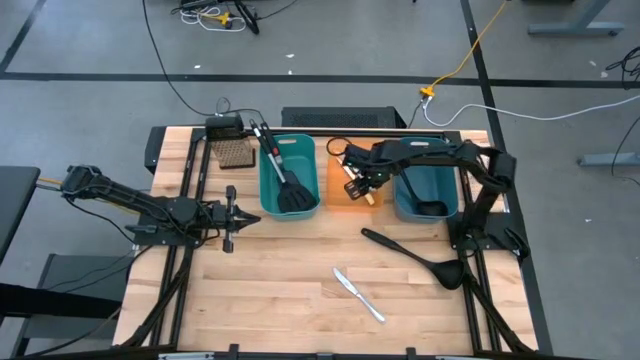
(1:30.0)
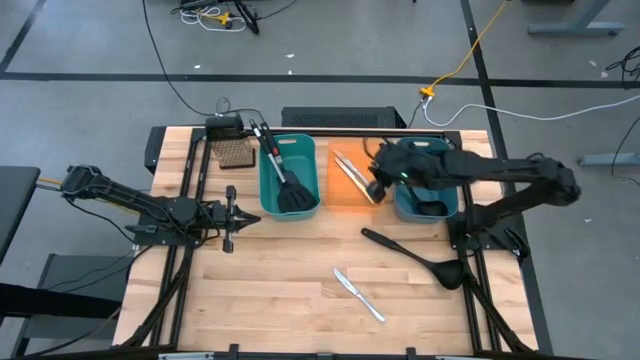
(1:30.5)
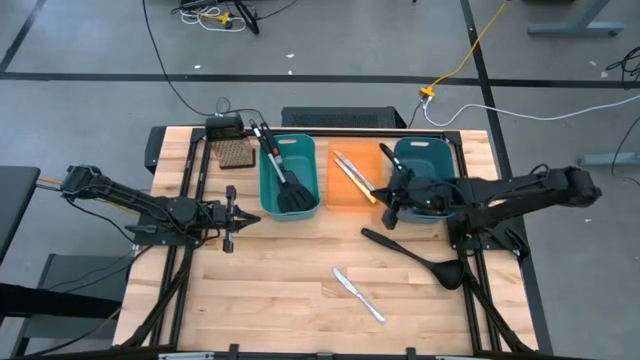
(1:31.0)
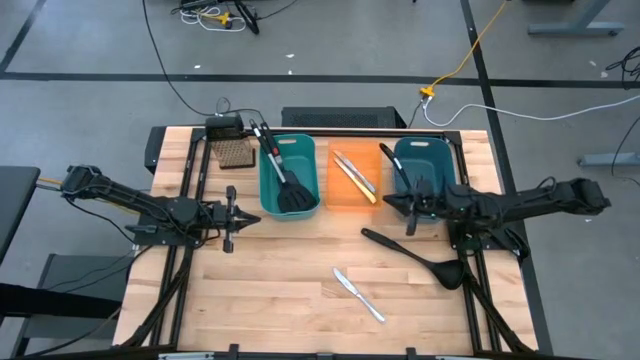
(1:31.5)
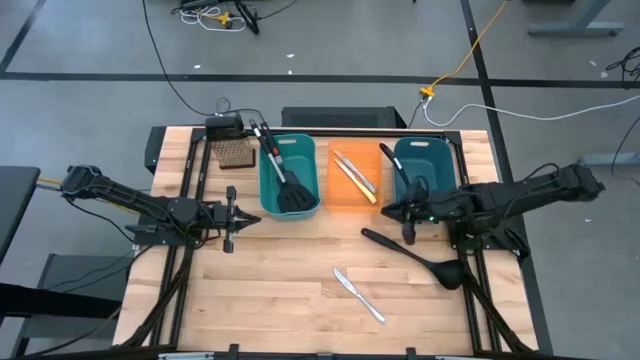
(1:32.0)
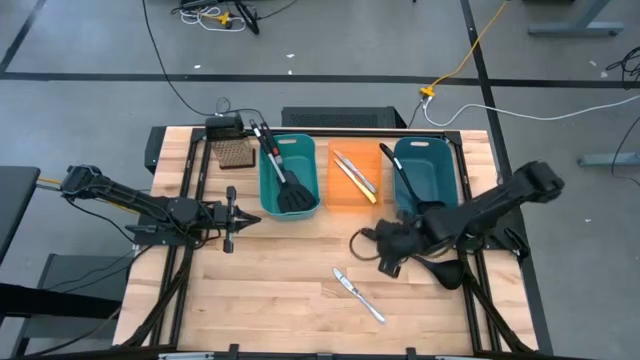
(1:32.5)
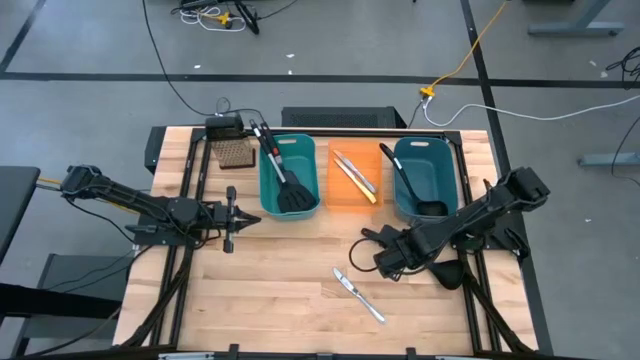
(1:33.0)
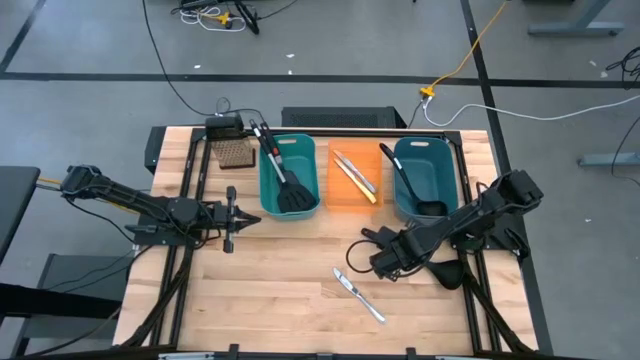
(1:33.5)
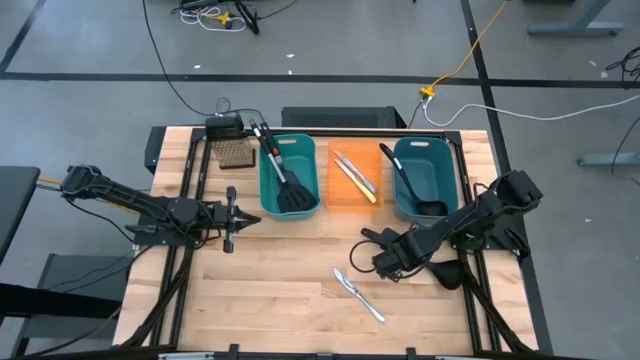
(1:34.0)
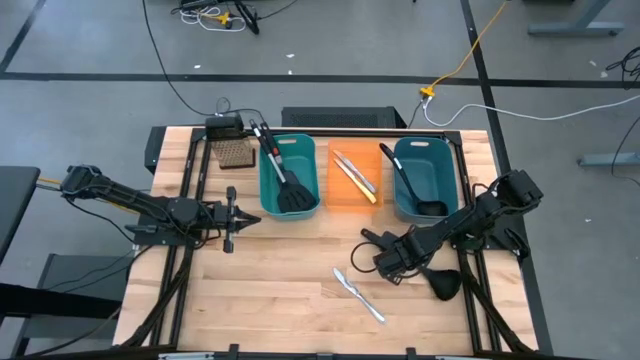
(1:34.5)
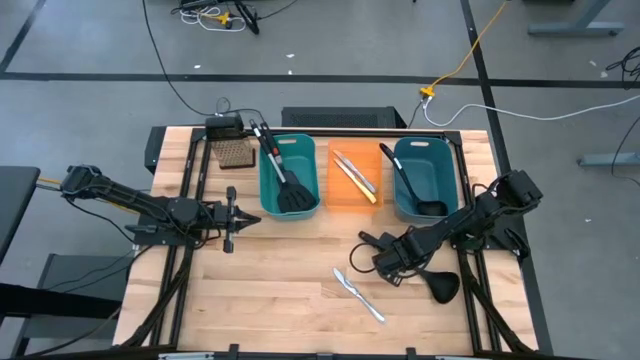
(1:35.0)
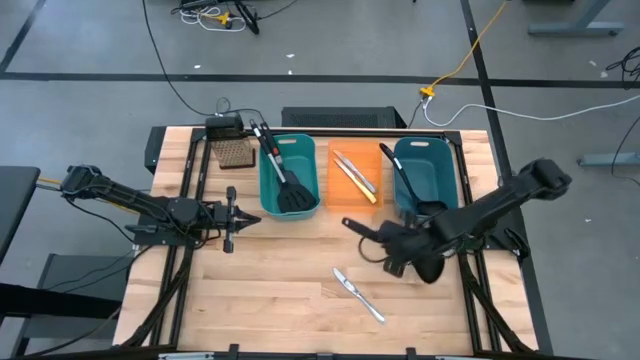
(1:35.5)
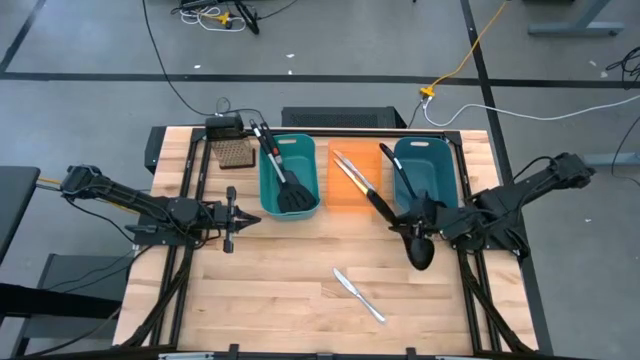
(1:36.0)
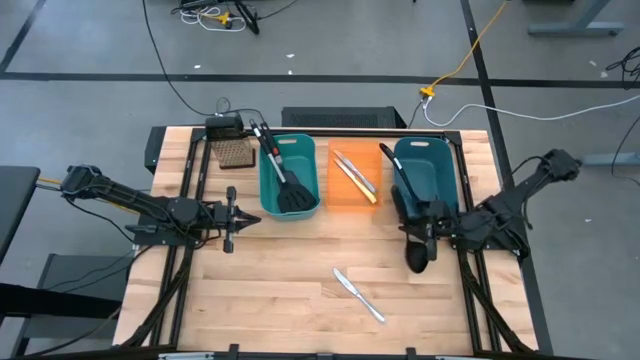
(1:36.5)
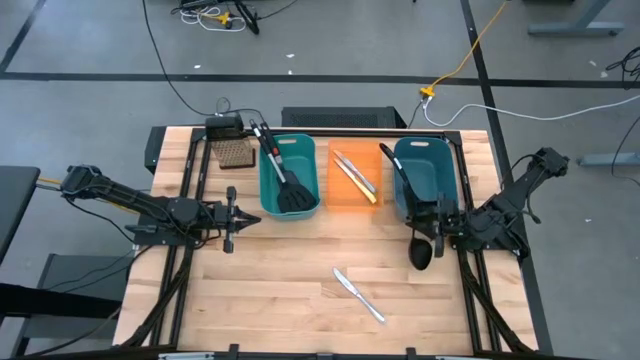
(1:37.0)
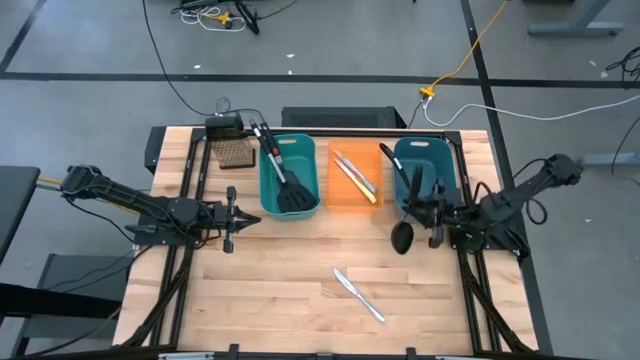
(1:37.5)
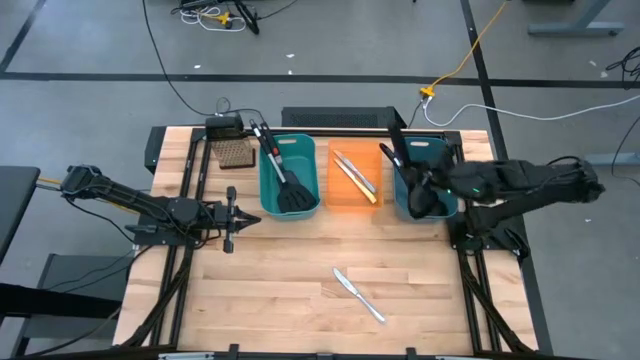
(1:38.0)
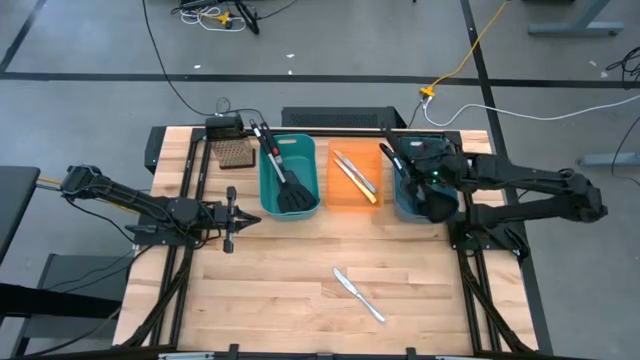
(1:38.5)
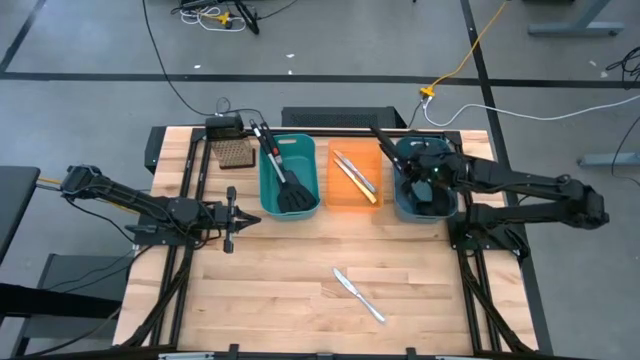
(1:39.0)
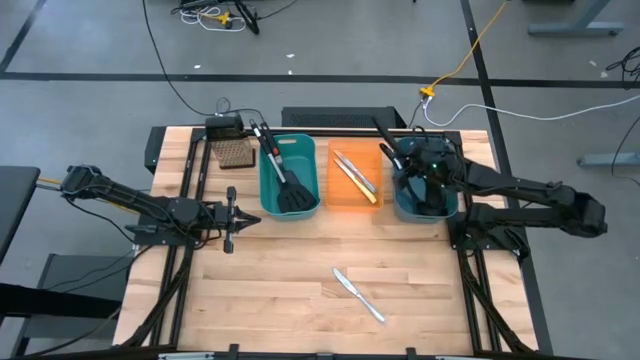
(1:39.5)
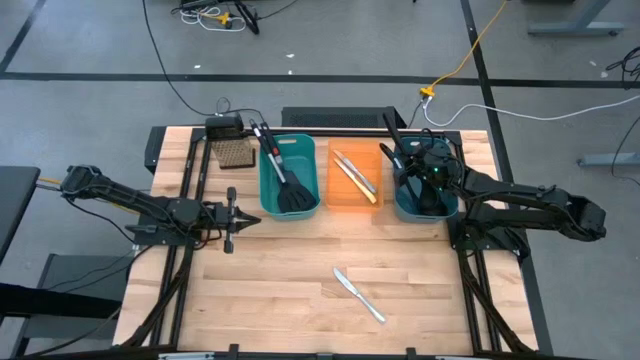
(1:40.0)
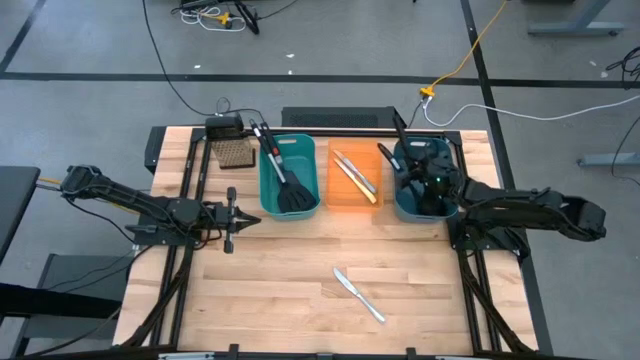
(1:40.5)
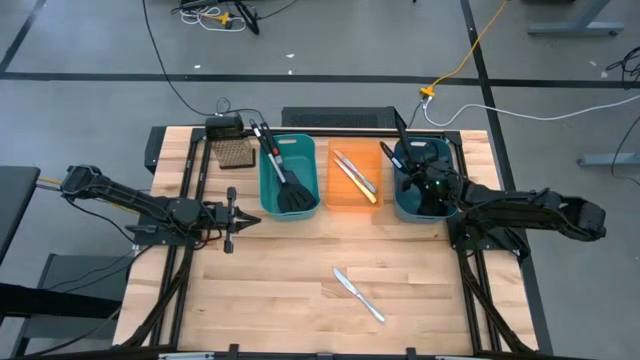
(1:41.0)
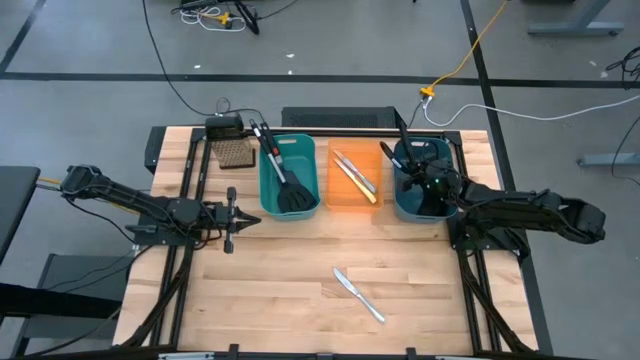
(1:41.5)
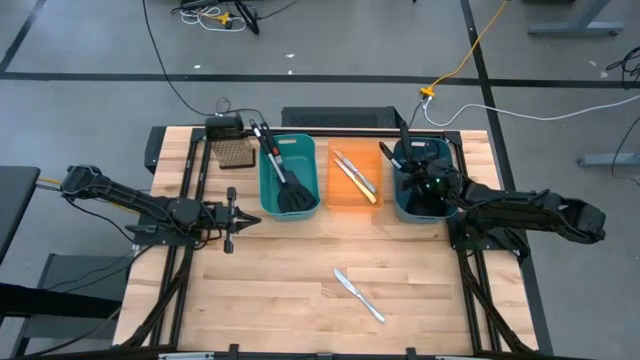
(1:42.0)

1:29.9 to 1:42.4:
Task: Pick & Place Kitchen Items
Put the ladle into the blue container

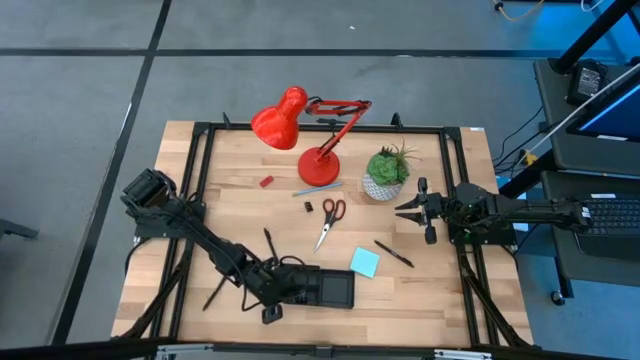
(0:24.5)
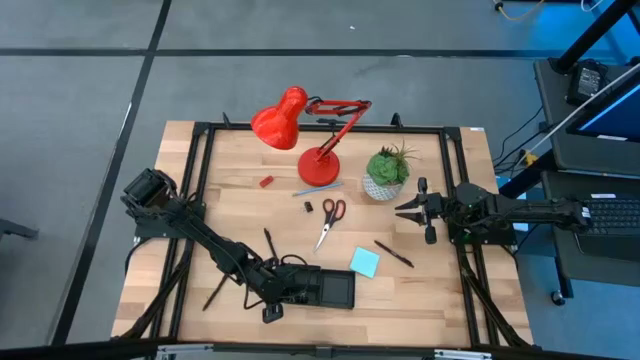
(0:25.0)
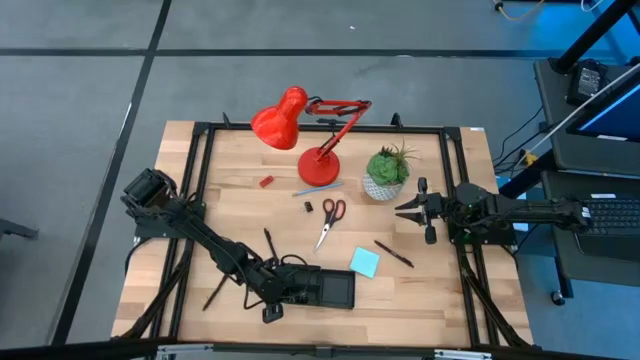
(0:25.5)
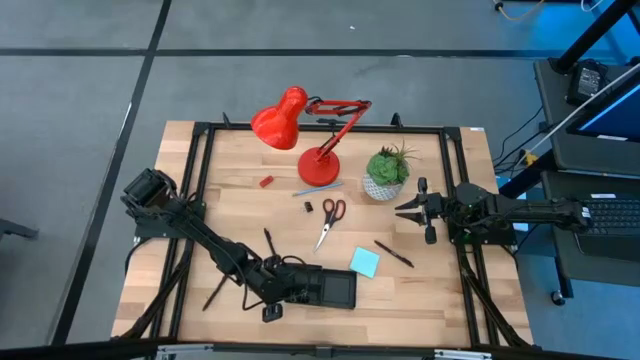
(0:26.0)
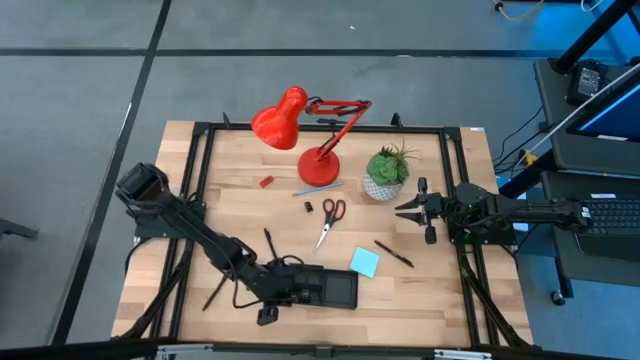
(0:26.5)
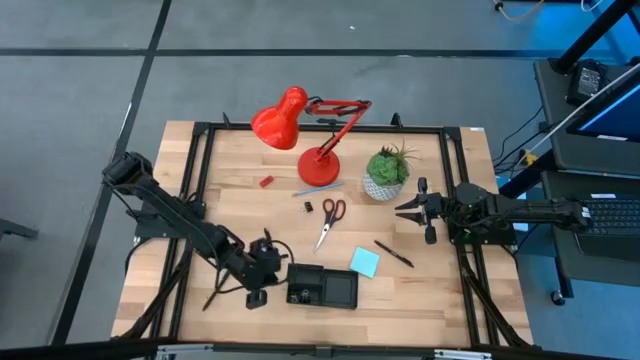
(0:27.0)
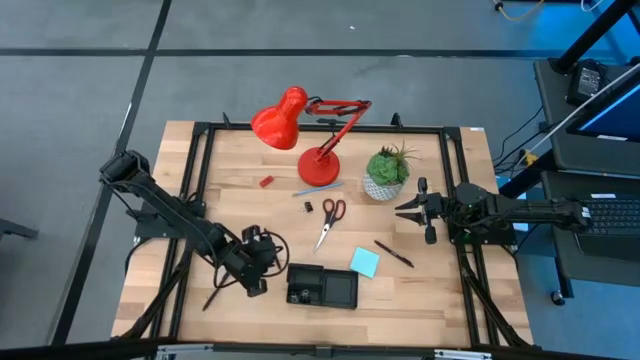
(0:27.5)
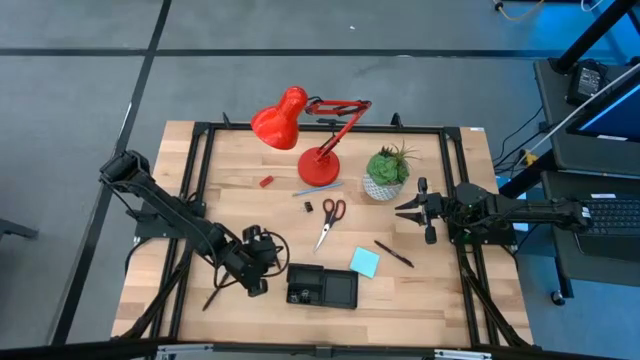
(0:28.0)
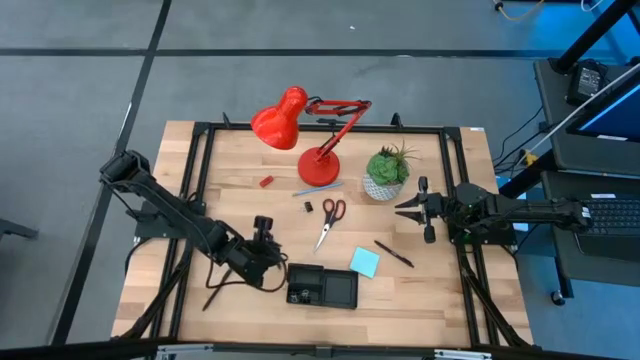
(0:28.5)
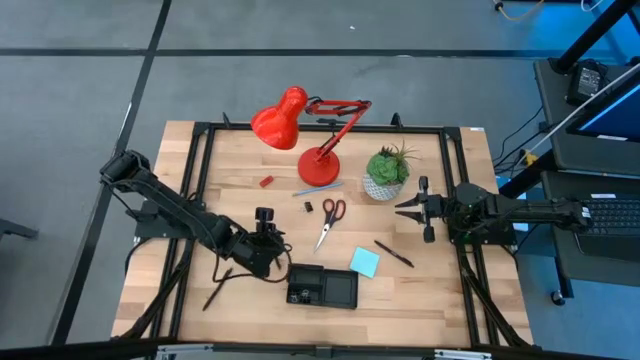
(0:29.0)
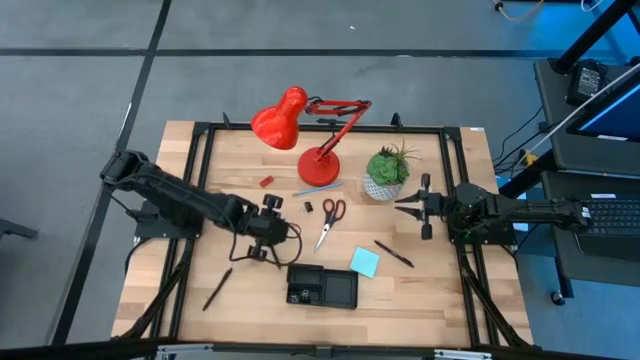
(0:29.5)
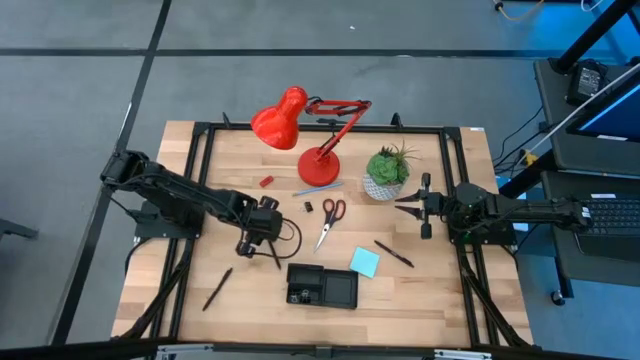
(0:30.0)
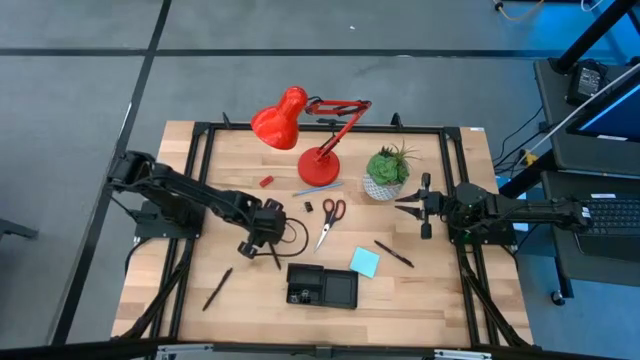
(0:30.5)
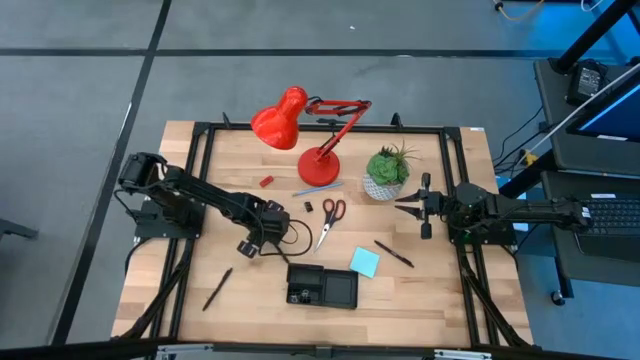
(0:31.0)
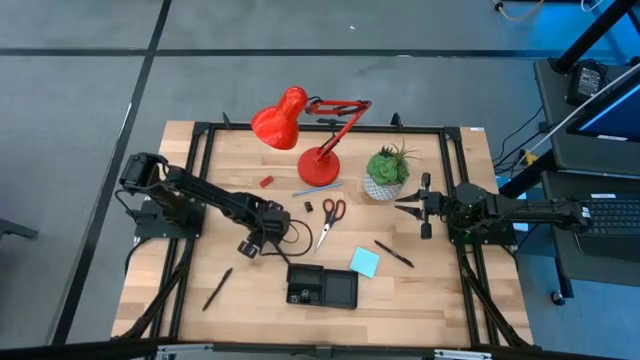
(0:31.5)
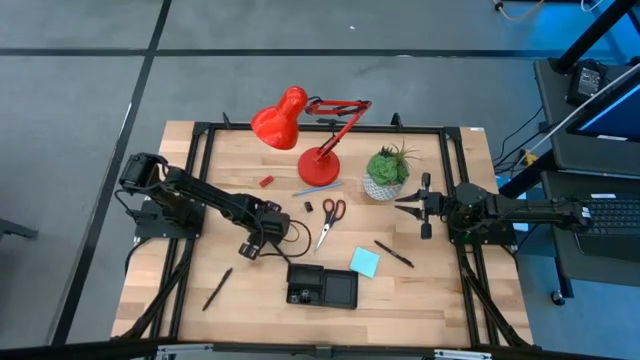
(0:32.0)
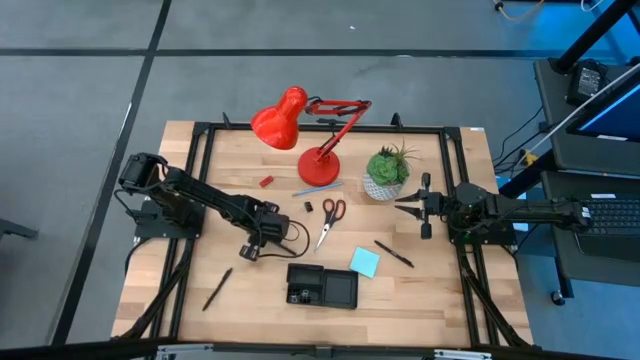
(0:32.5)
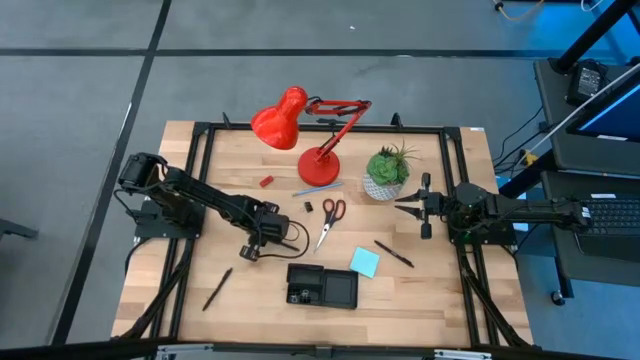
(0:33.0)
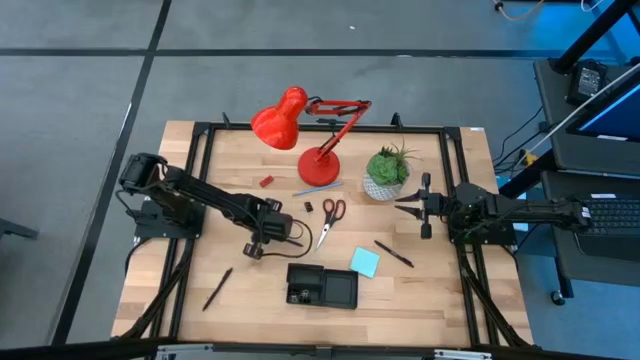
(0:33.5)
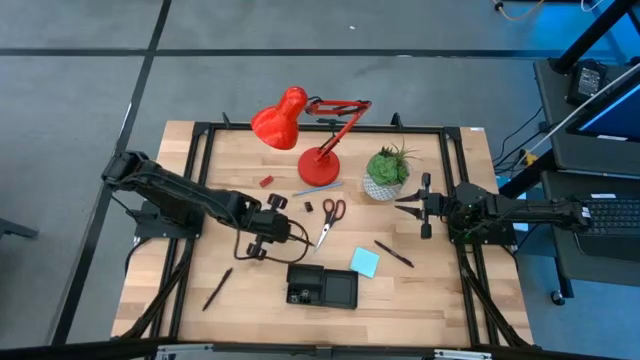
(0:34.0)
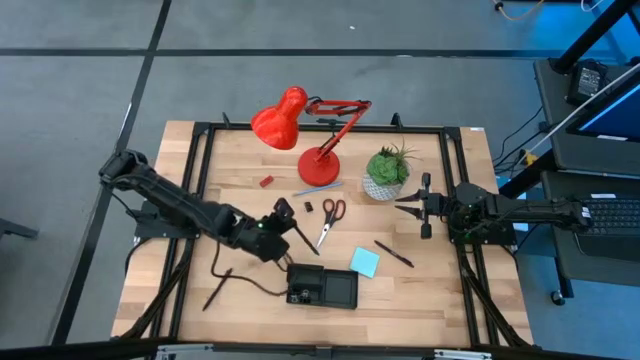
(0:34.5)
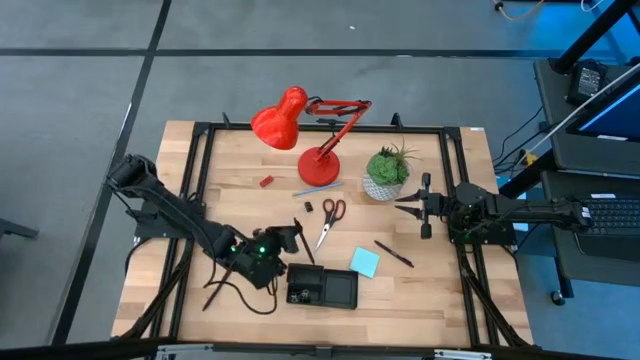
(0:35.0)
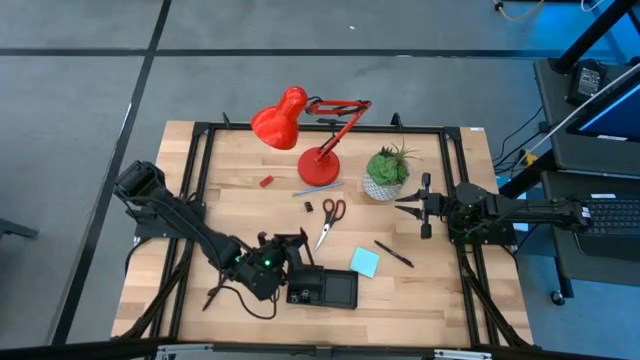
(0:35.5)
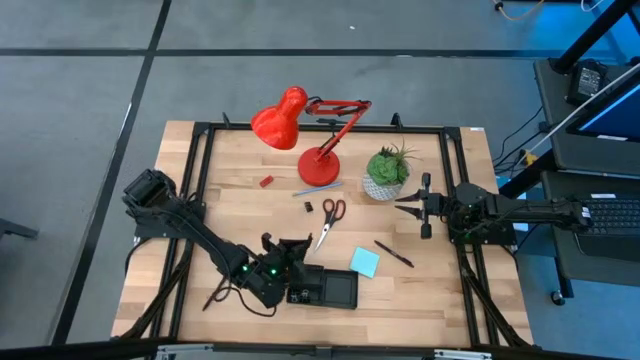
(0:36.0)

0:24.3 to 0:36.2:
Task: Pick and place office supplies into organizer
Put the top left black pen into the black desk organizer
